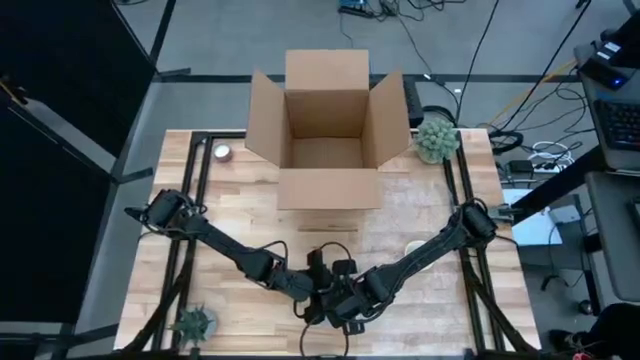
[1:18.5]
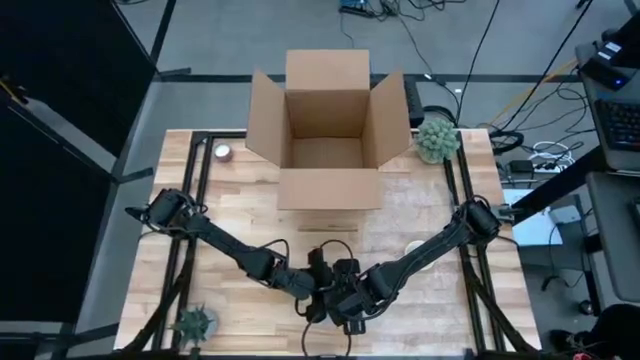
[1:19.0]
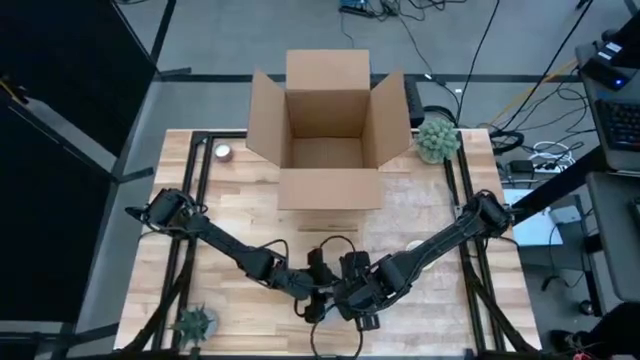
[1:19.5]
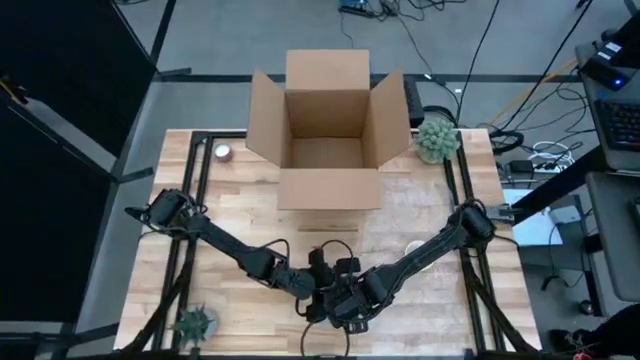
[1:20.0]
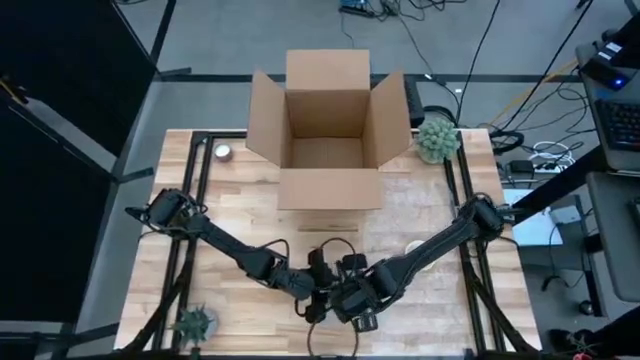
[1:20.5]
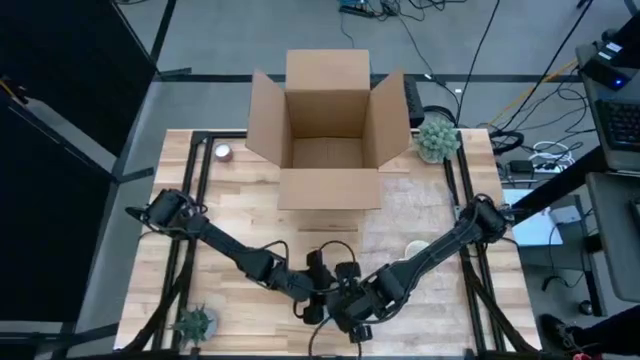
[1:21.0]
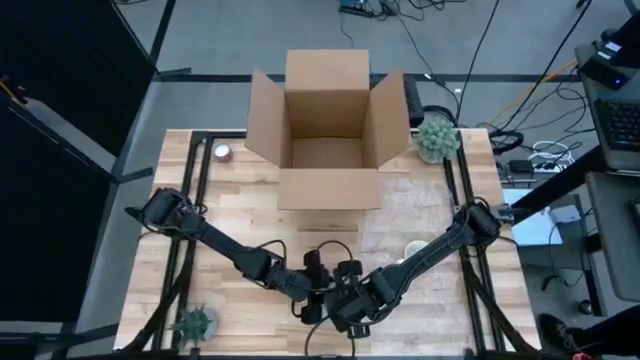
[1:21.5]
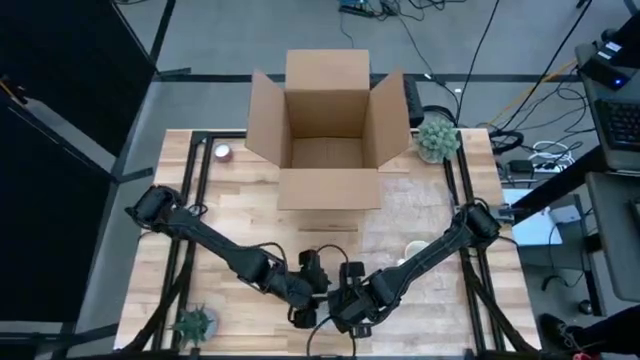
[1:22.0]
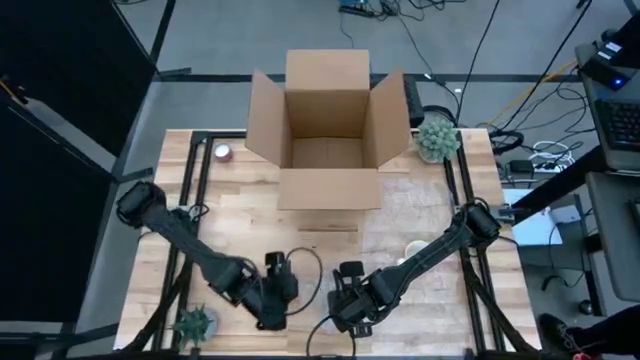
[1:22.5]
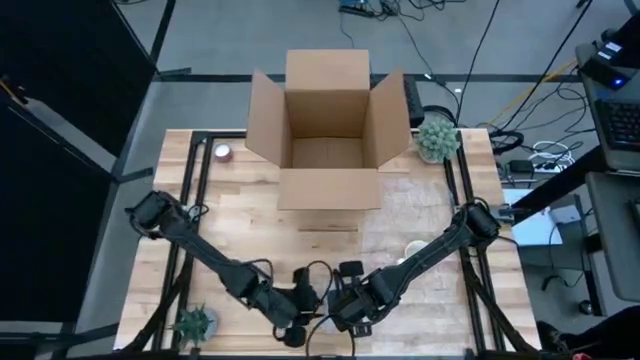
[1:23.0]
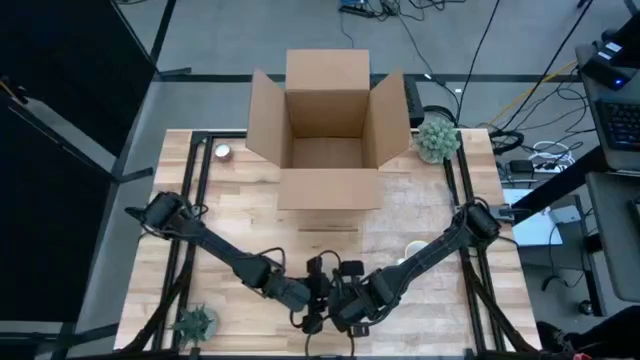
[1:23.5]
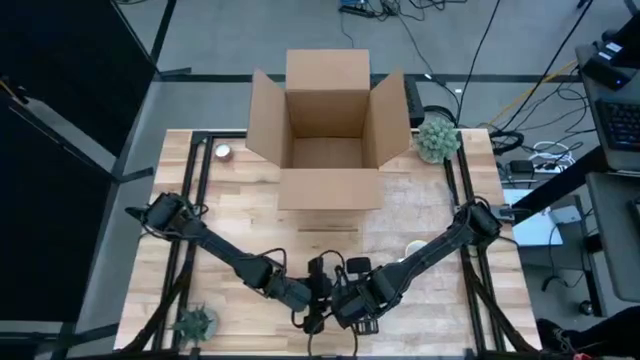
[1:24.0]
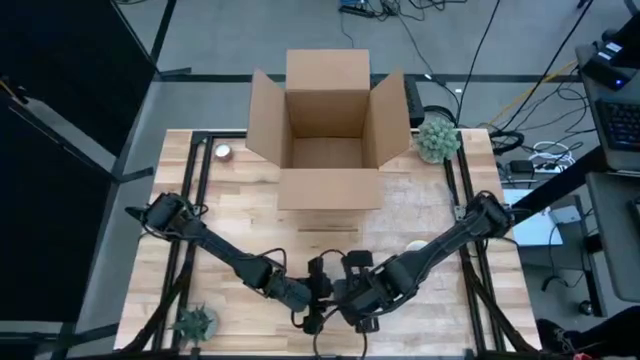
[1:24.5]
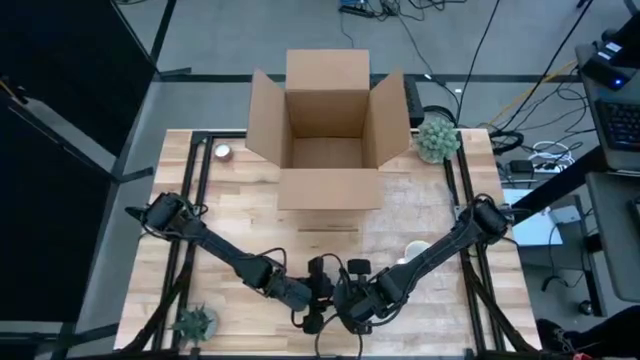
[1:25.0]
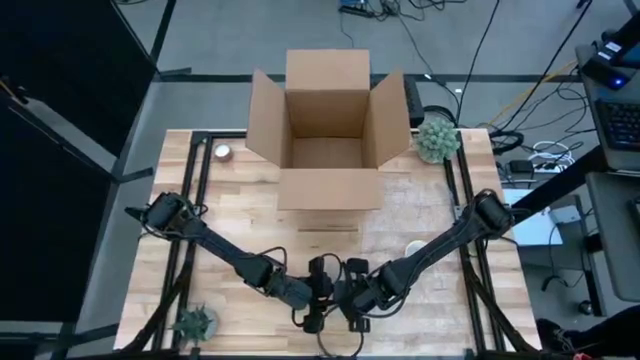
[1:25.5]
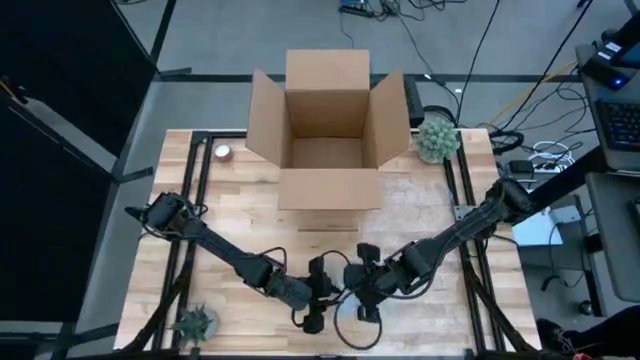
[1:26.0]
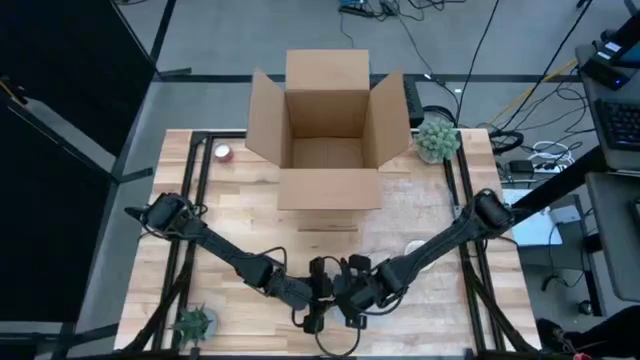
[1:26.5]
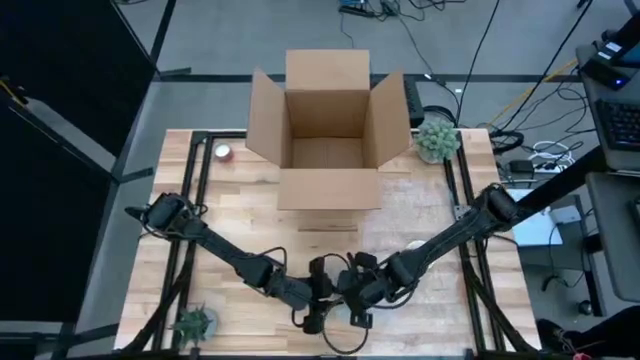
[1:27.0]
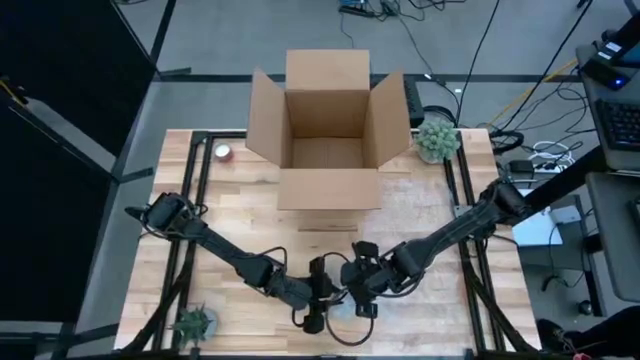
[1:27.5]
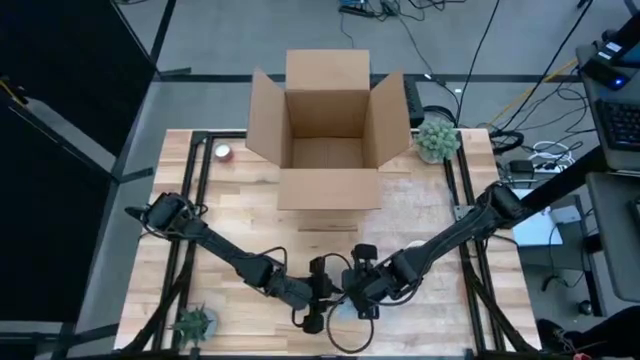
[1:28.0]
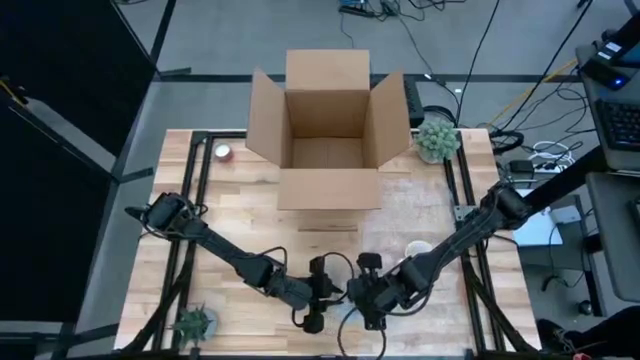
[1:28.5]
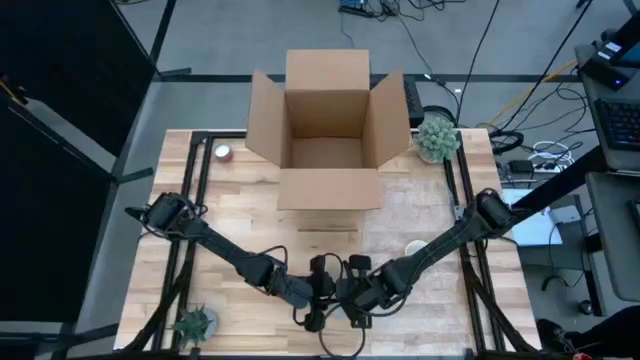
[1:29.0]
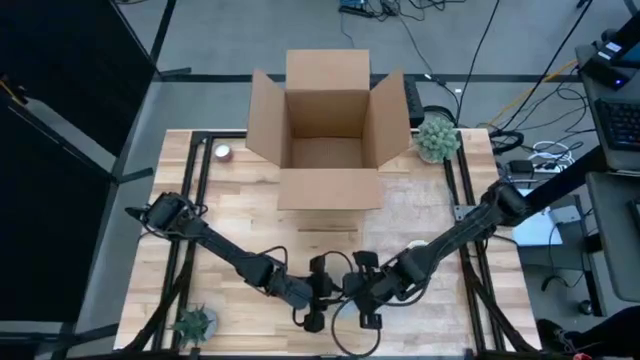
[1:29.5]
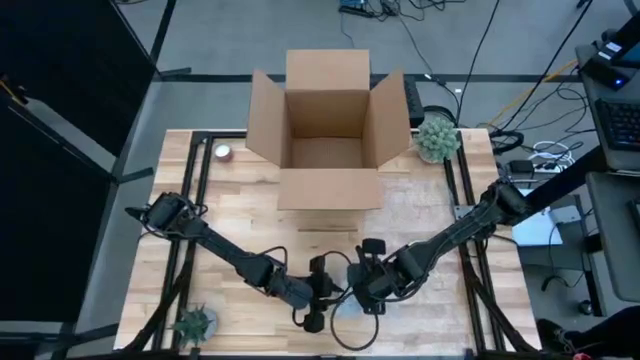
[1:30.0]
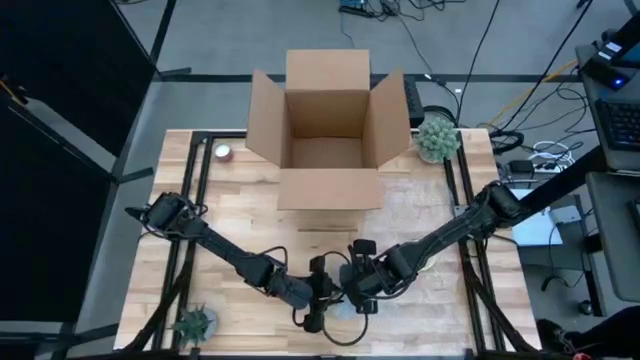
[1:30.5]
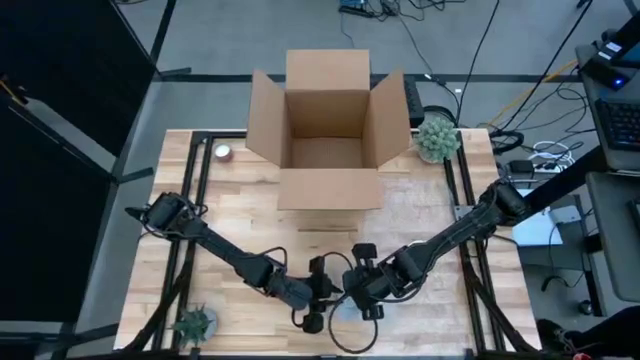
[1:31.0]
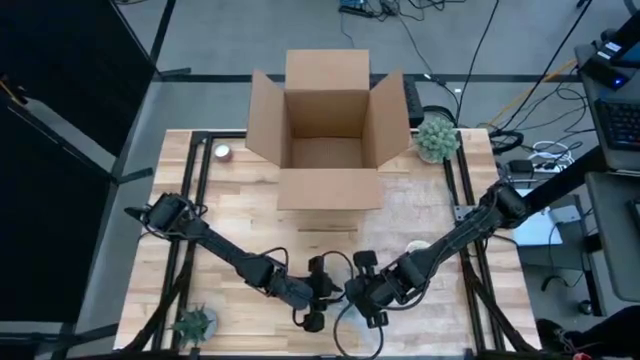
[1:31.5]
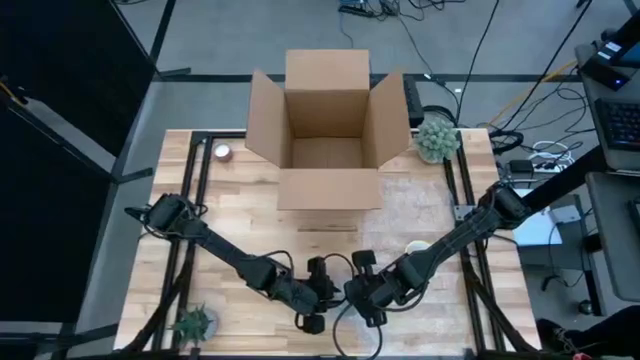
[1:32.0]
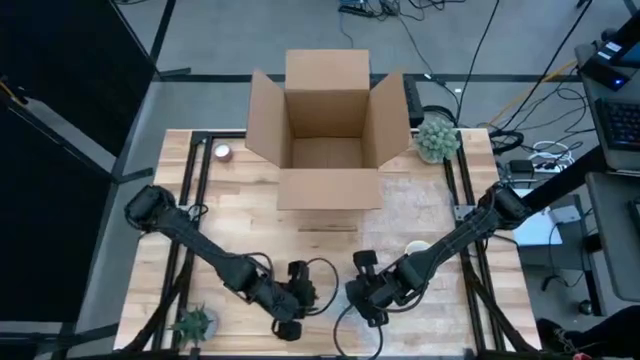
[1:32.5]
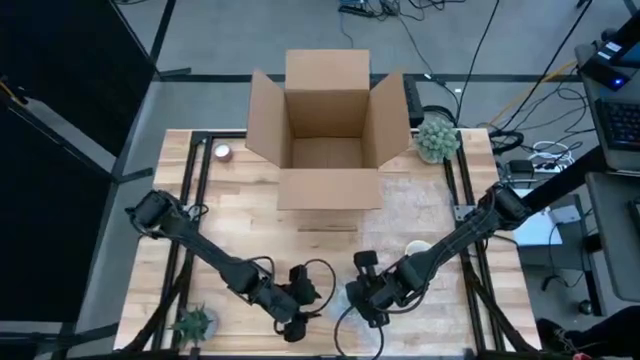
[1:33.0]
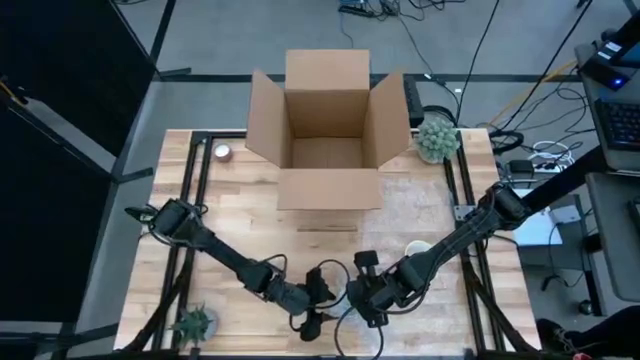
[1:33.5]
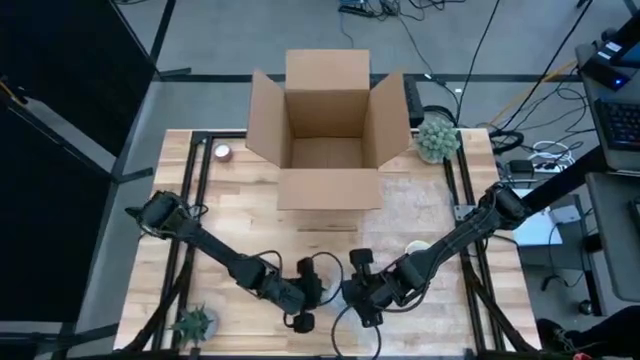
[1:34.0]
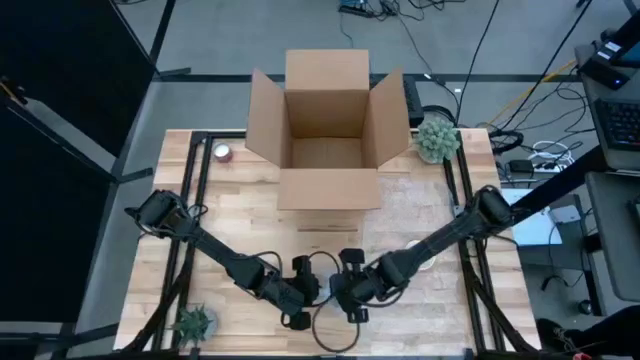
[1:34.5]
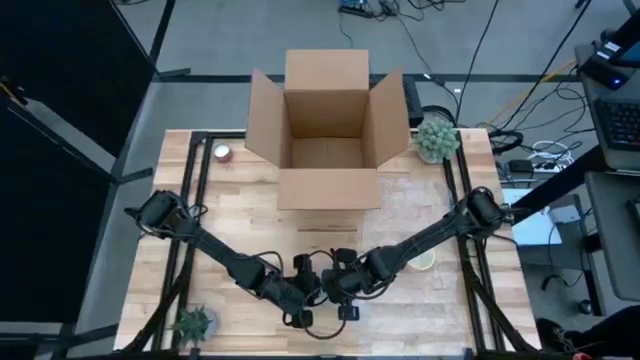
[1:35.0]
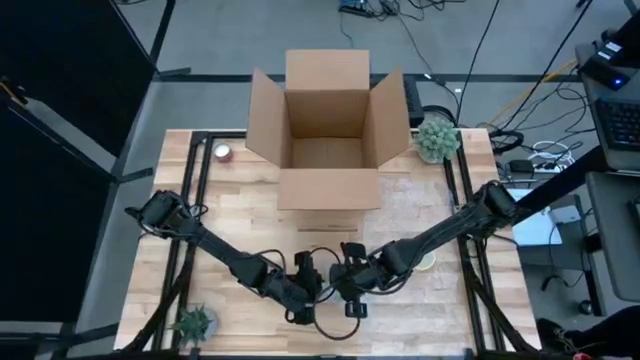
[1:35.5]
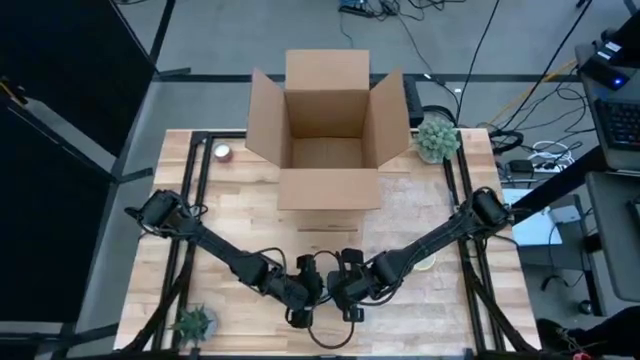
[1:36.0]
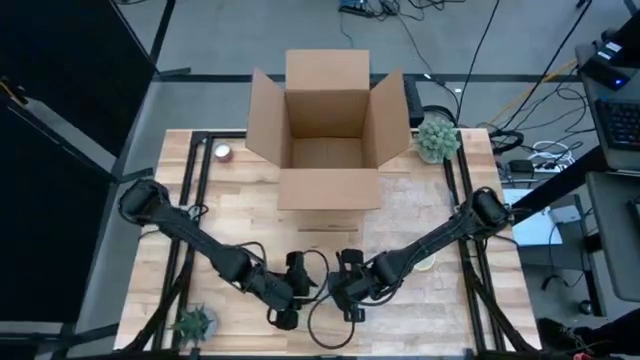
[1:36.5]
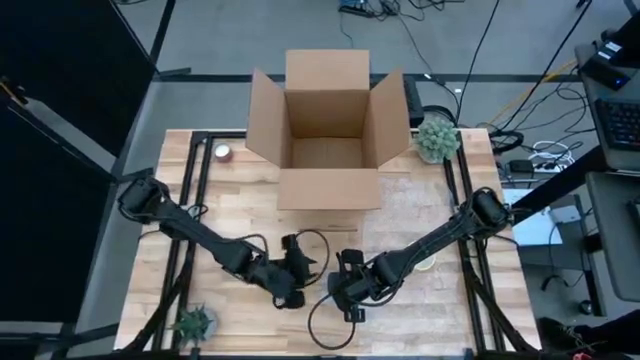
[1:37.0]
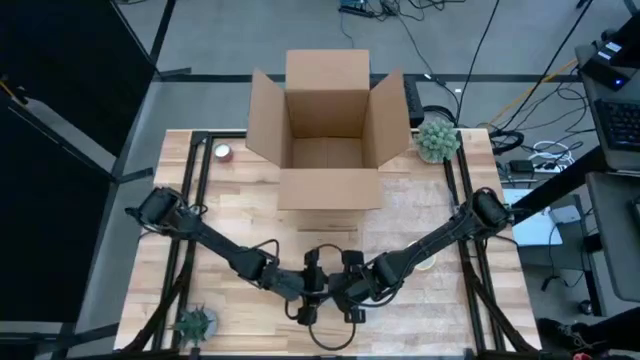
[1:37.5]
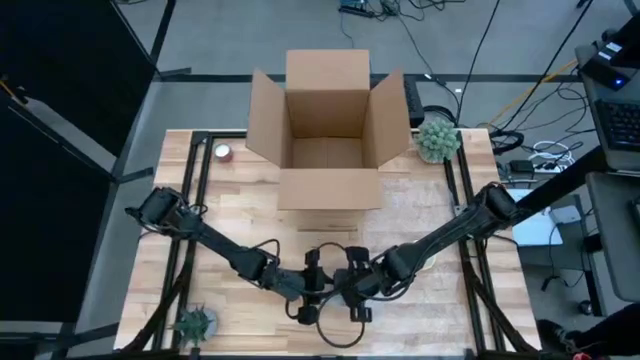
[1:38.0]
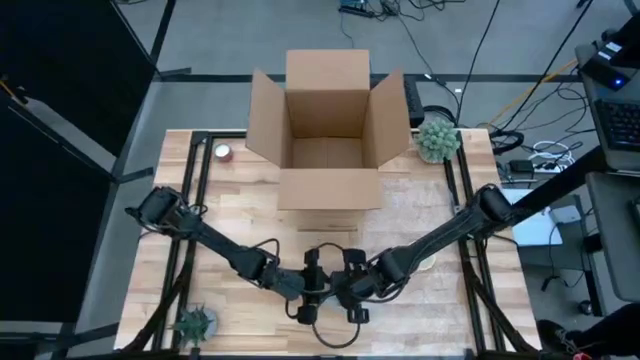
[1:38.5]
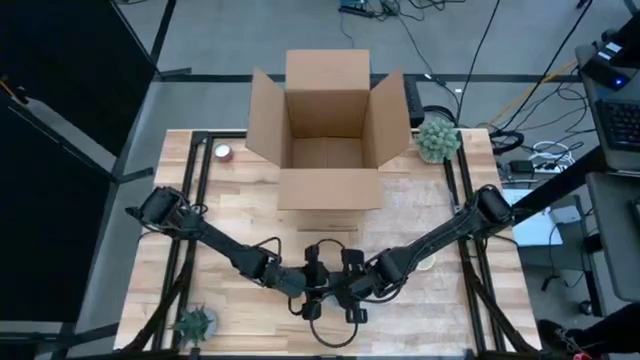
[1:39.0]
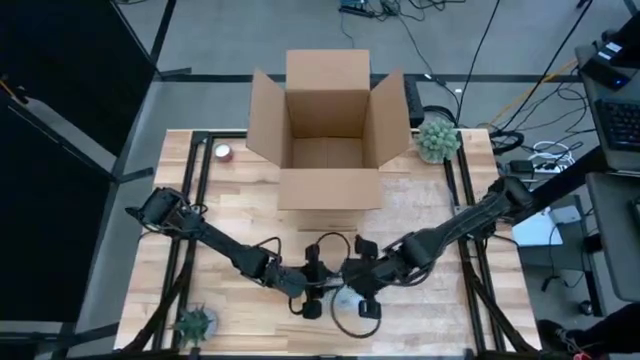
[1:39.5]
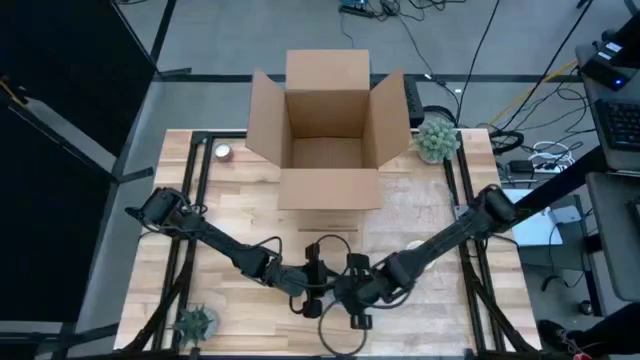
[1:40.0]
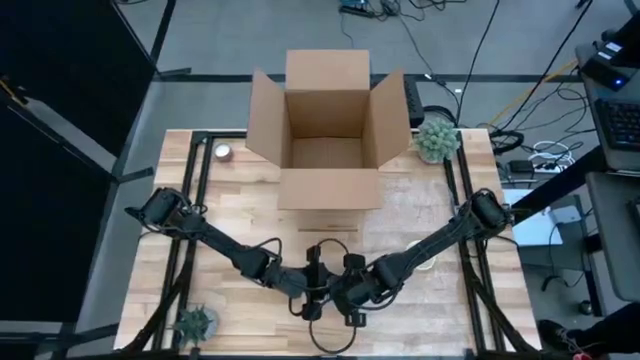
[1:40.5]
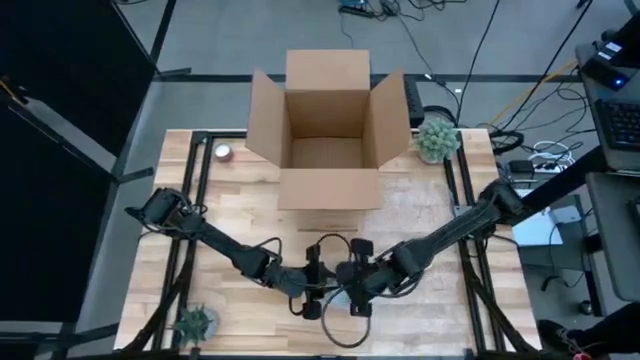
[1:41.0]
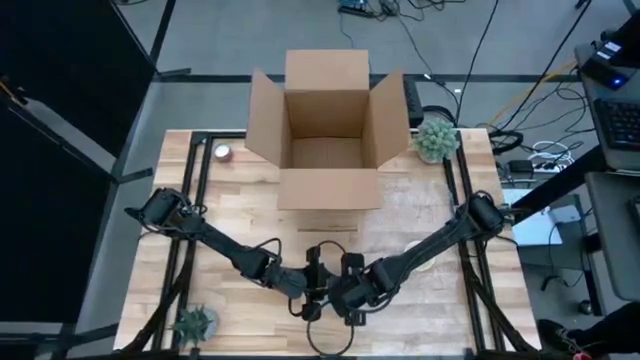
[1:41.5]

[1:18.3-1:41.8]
Task: wrap mug
Wrap the red cup with the left transparent bubble wrap
